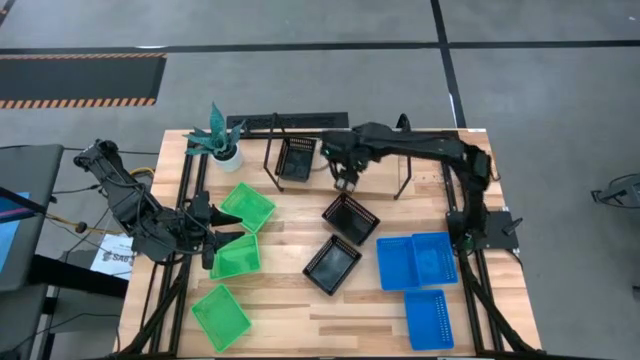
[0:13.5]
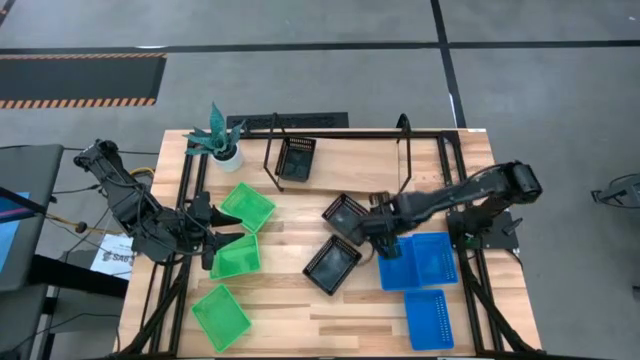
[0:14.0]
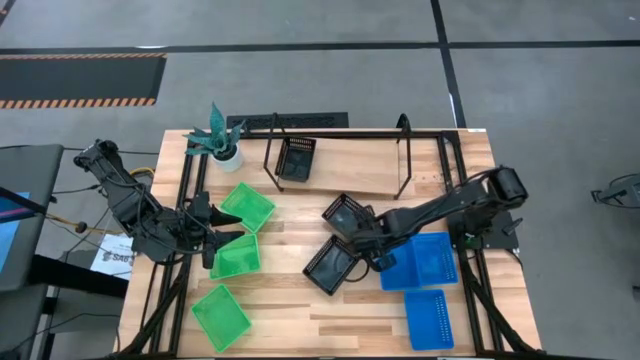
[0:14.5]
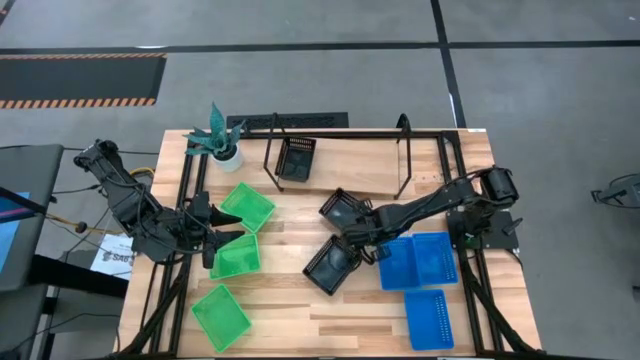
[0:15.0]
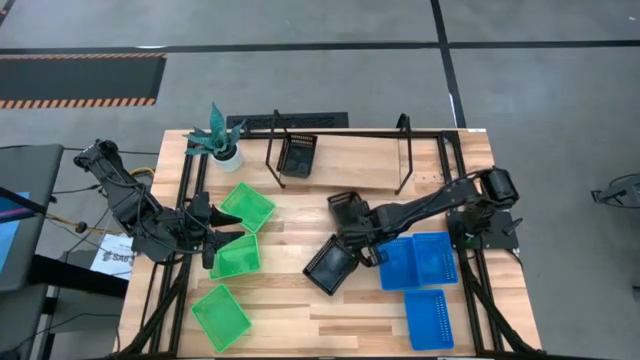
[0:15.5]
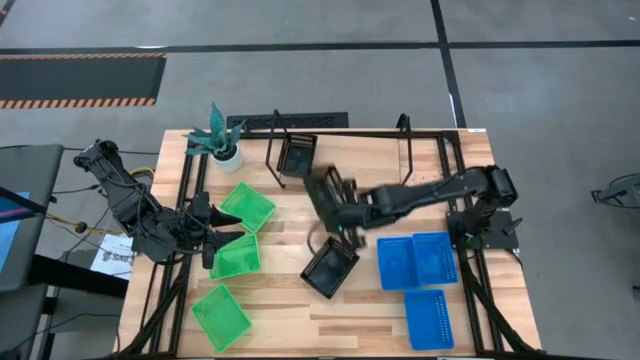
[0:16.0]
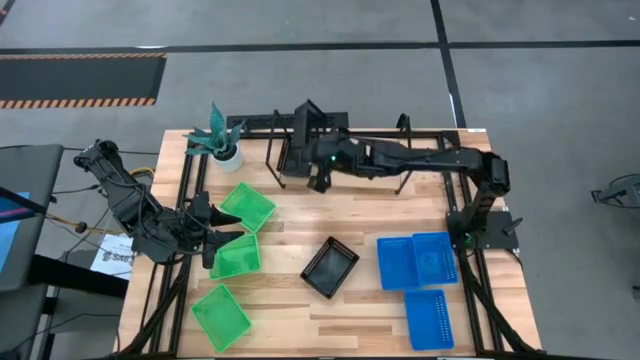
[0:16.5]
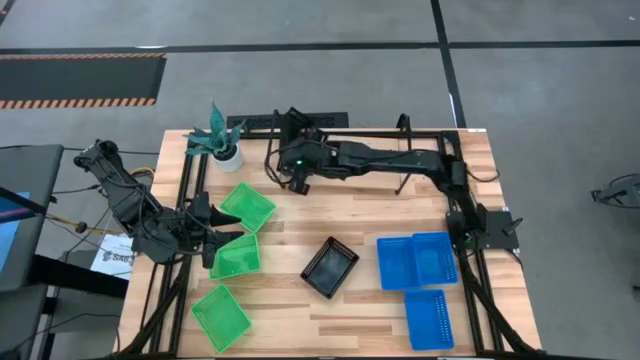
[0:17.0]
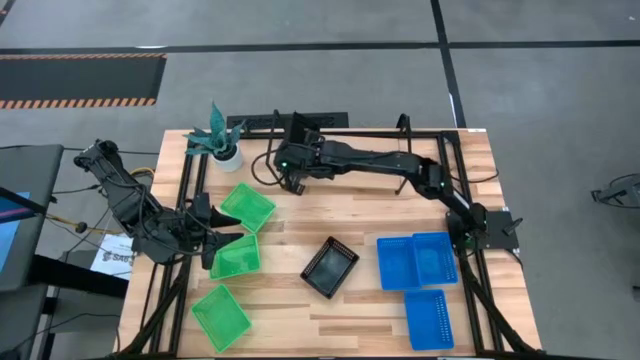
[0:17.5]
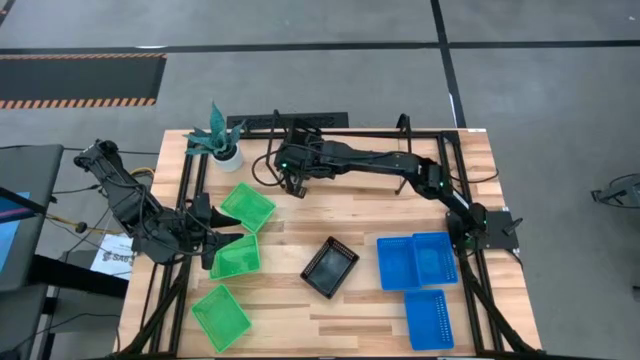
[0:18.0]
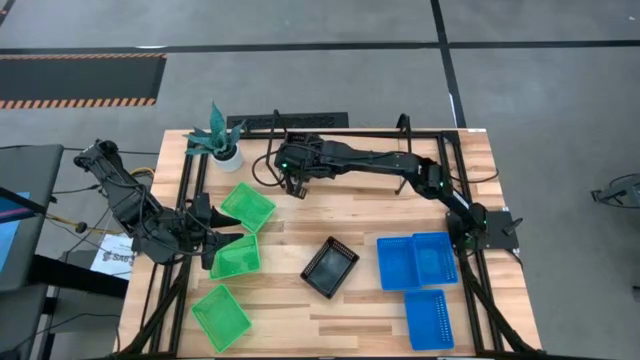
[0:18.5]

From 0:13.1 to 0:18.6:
Task: Stack baskets on shelf by color
Stack the right black basket on top of the other black basket on the shelf

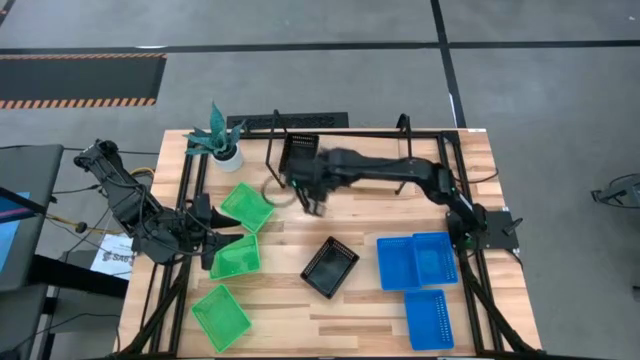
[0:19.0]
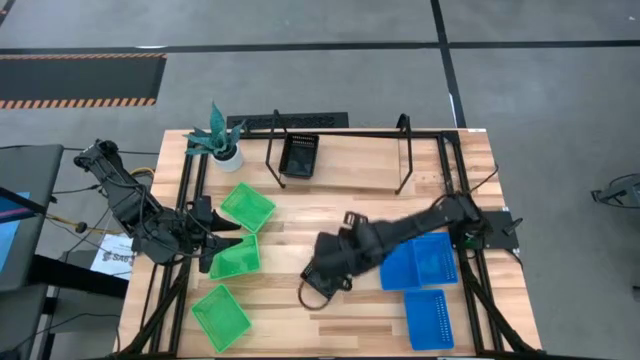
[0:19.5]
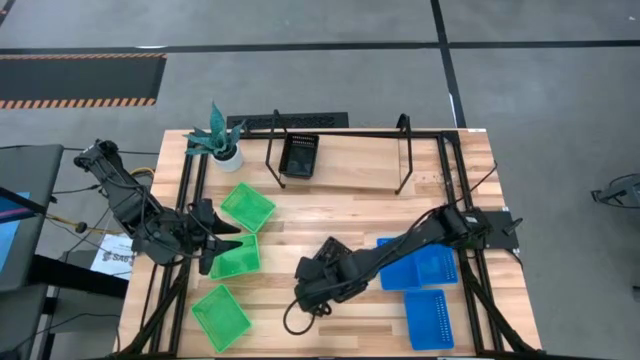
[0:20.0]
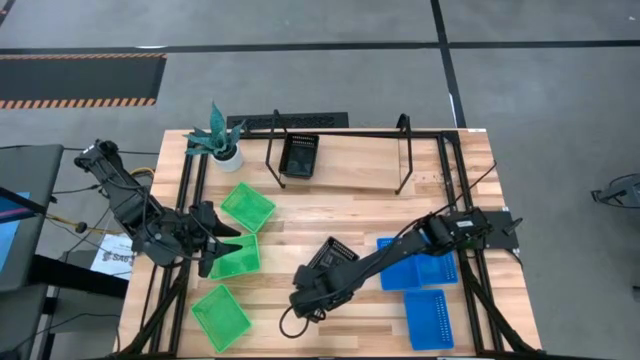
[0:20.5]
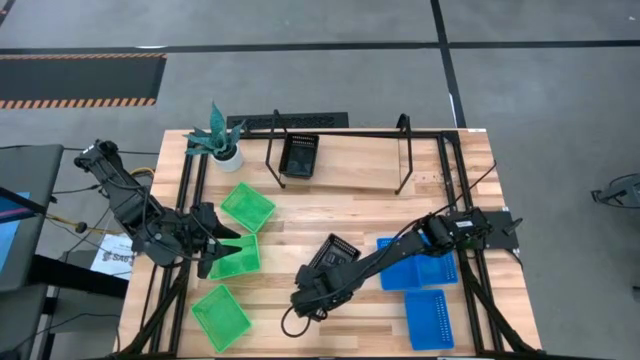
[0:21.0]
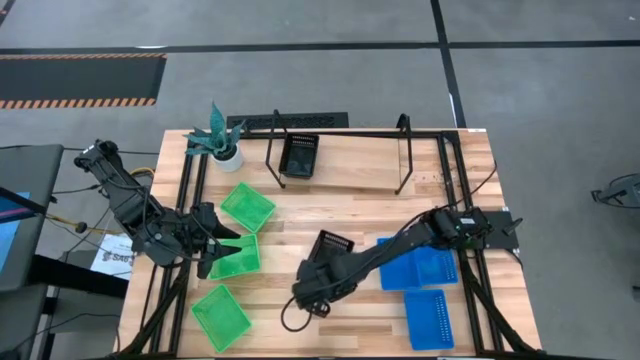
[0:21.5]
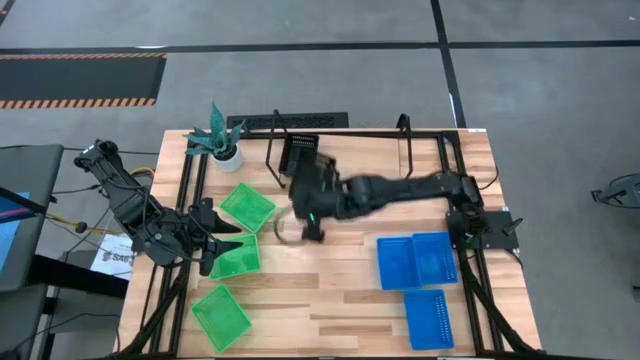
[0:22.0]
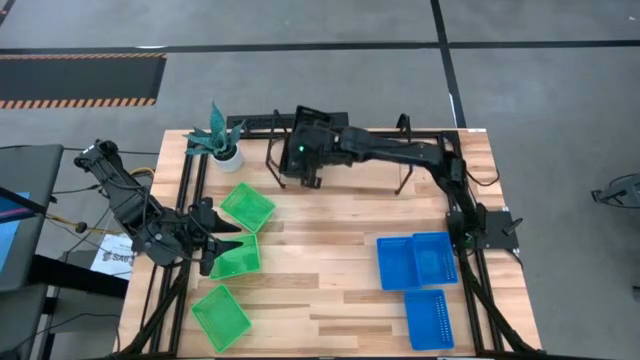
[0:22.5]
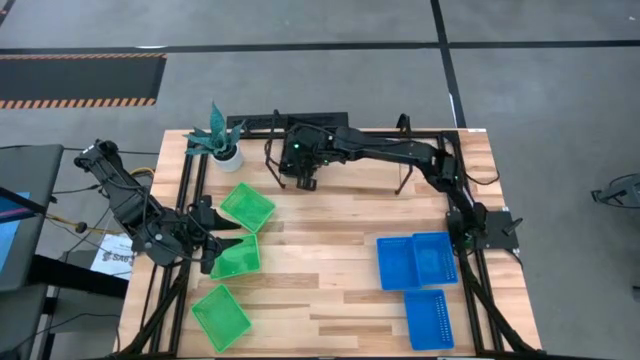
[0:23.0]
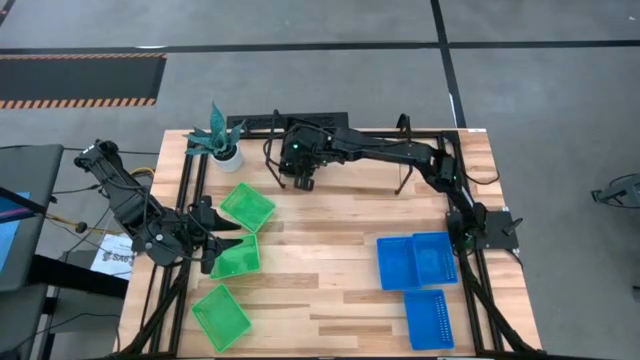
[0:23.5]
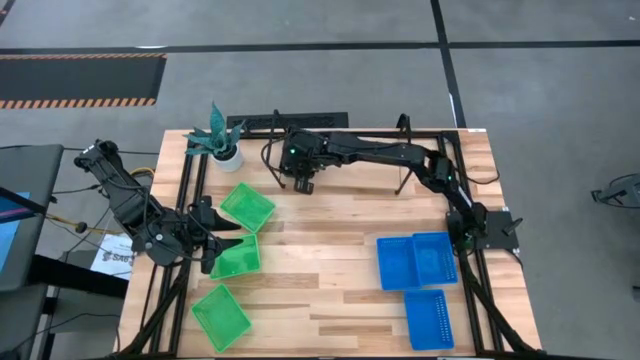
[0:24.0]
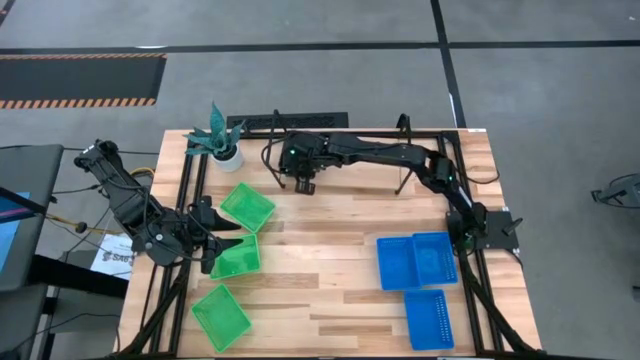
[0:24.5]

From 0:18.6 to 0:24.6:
Stack the black basket on top of the other black baskets on the shelf

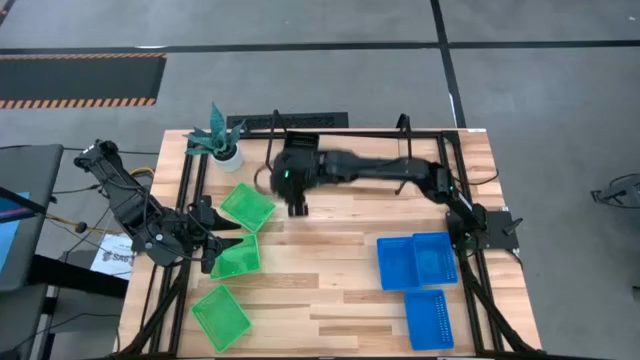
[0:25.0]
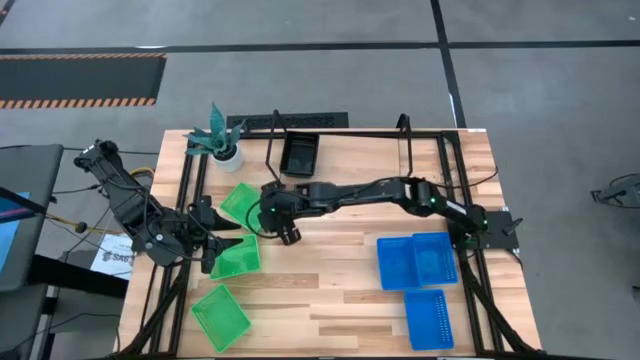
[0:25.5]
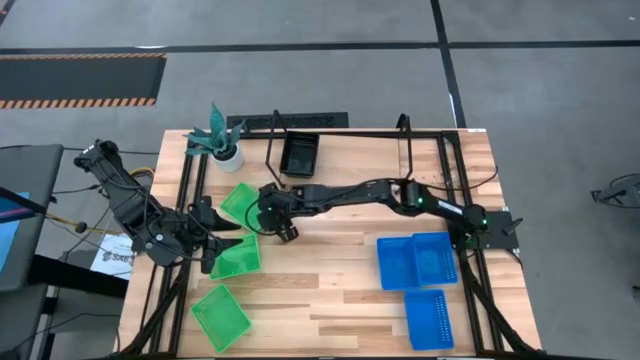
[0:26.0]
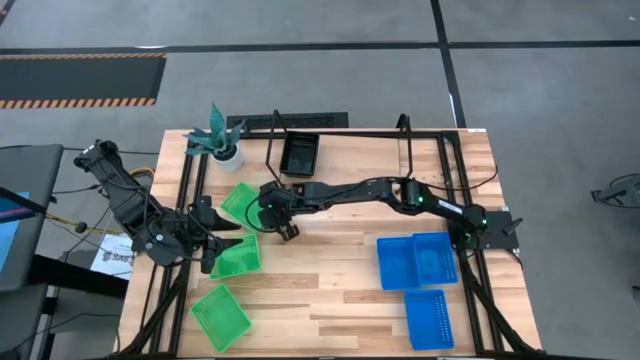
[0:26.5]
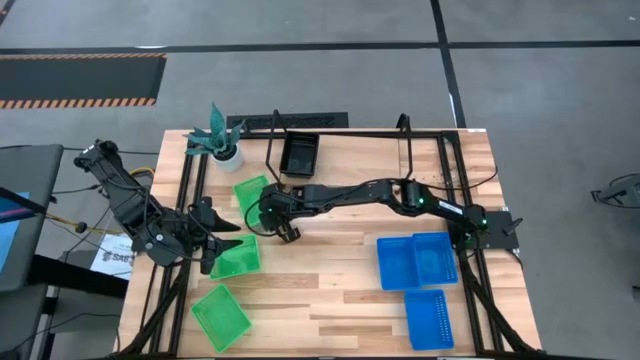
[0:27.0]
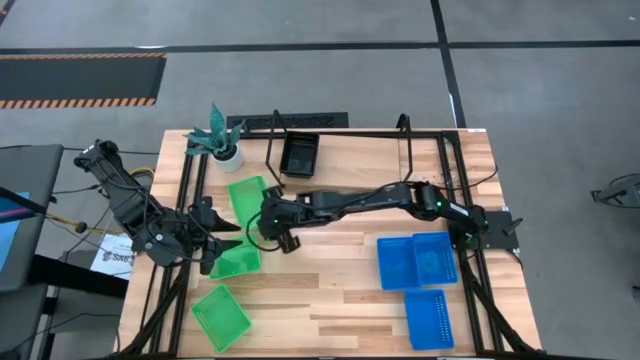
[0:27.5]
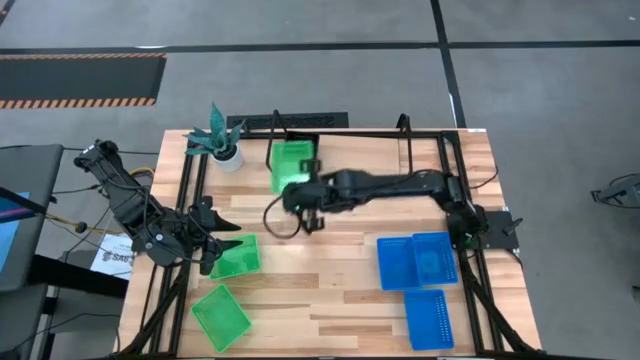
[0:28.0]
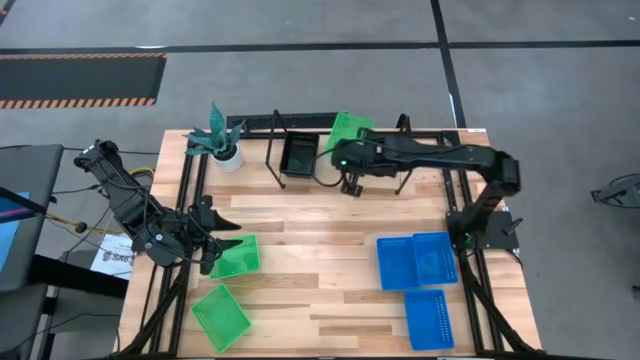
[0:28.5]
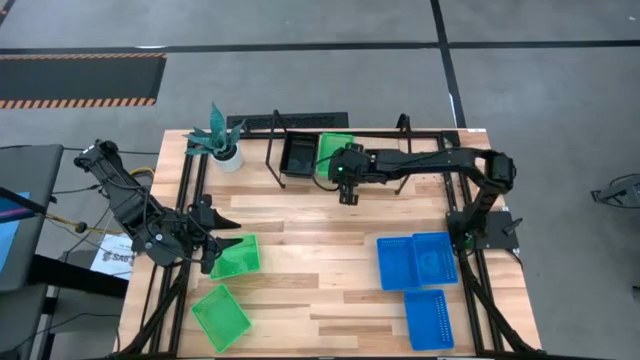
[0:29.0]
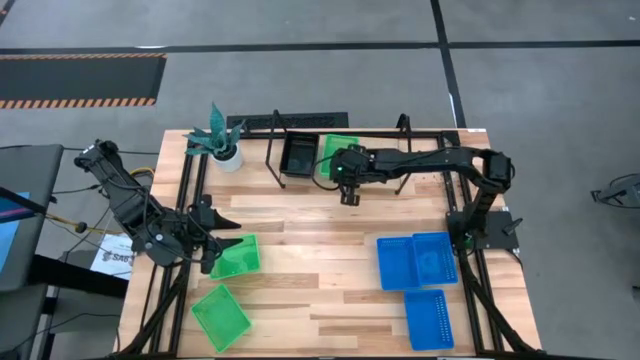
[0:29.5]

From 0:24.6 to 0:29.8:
Put the top green basket on the shelf

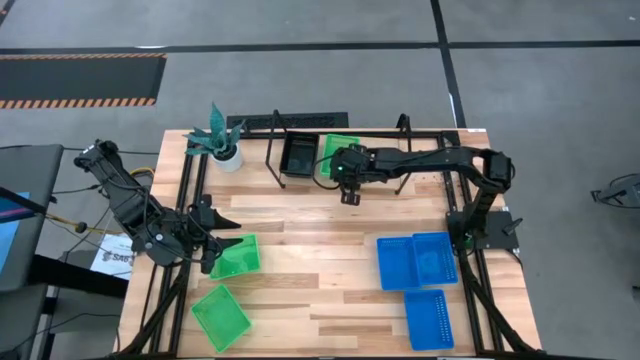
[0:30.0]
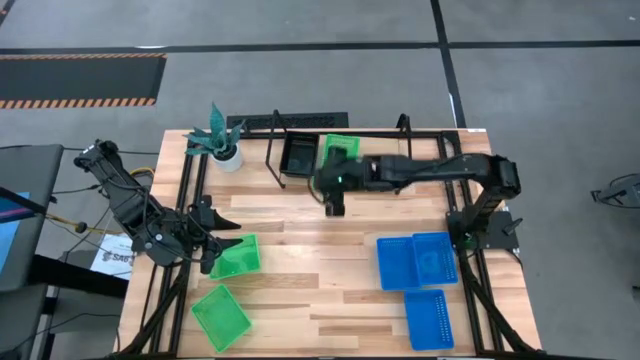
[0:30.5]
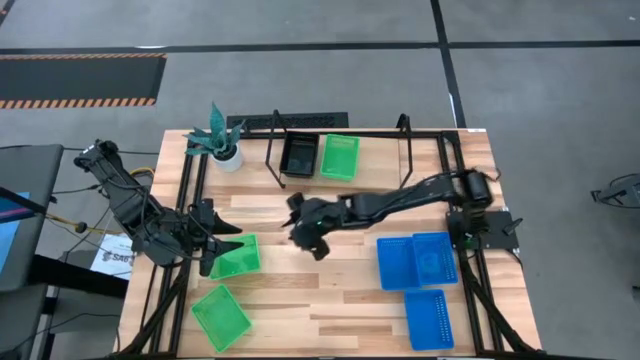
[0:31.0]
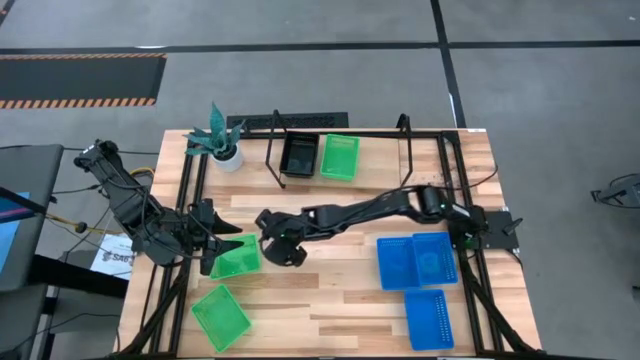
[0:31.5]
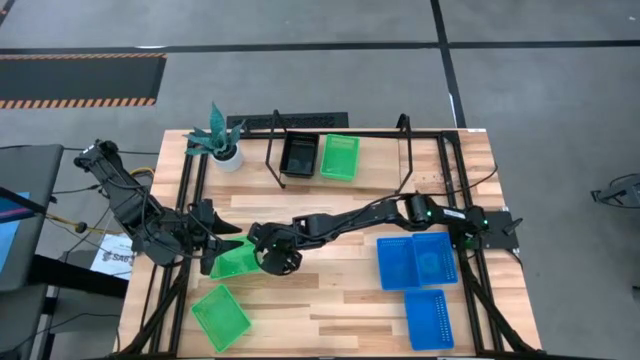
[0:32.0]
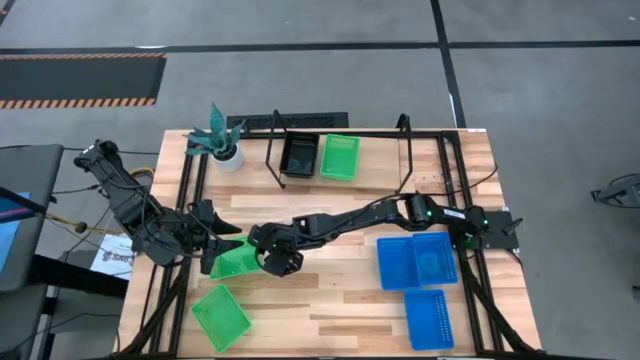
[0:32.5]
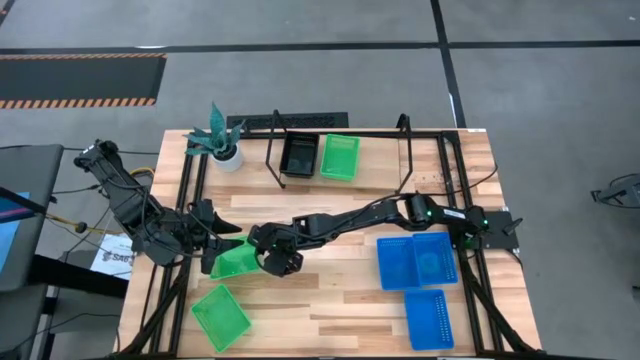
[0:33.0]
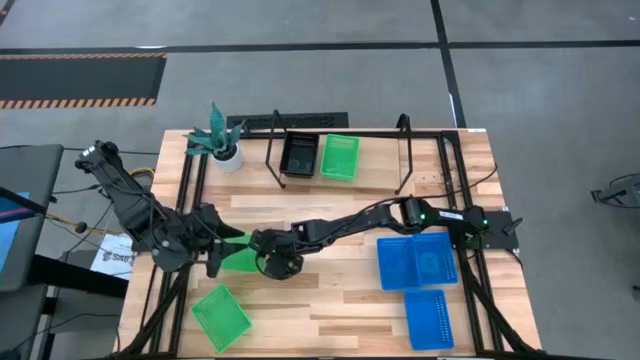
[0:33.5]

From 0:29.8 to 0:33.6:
Stack the top green basket on top of the other green basket on the shelf
